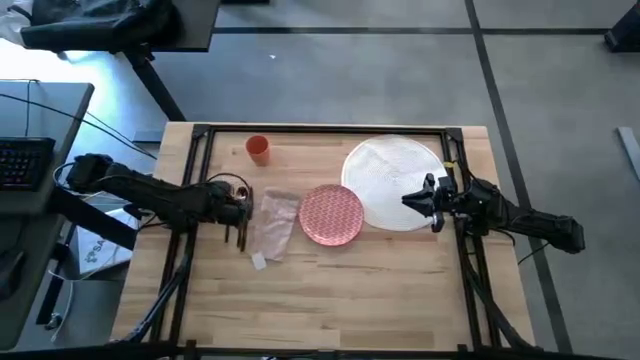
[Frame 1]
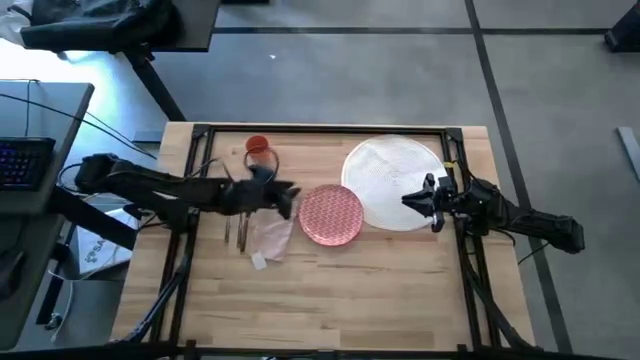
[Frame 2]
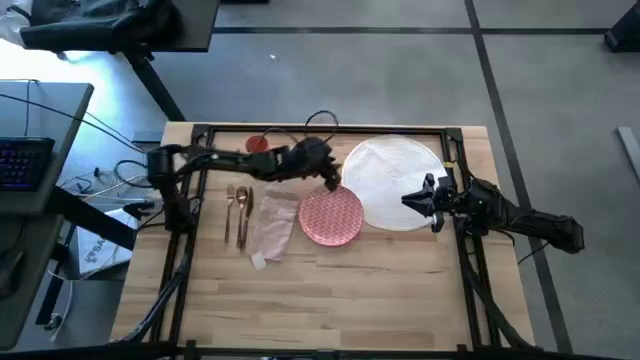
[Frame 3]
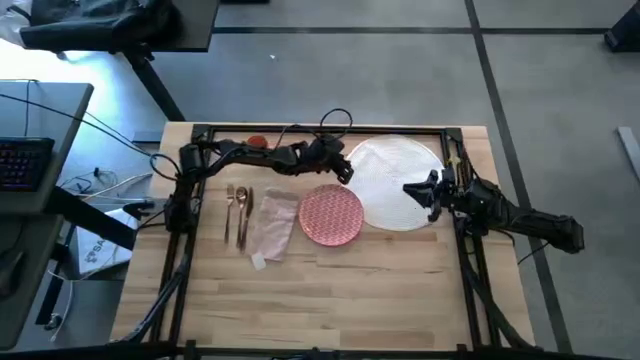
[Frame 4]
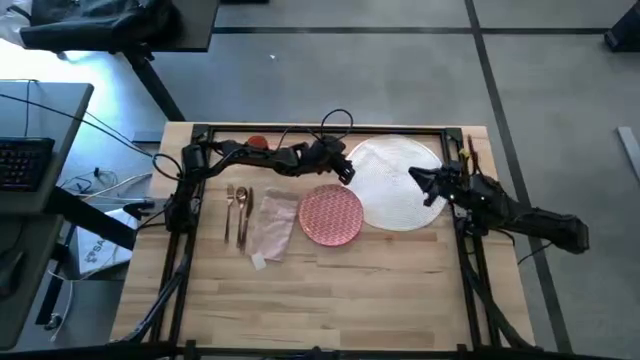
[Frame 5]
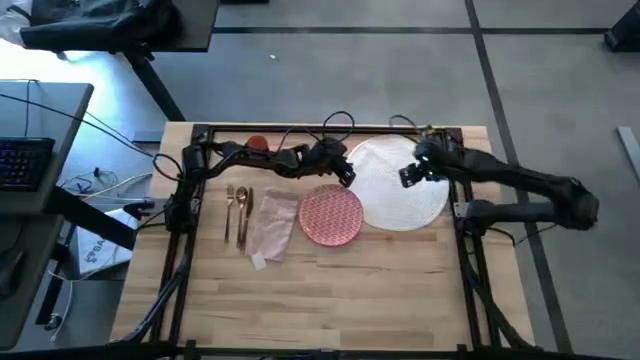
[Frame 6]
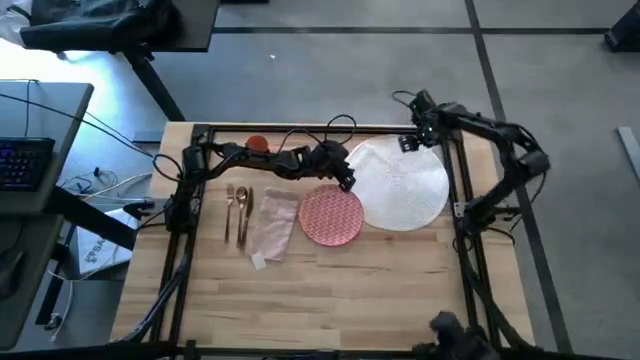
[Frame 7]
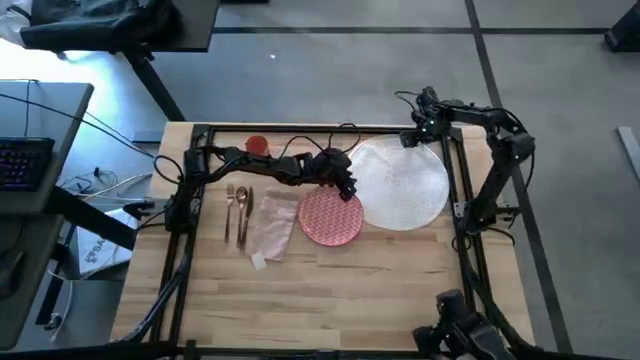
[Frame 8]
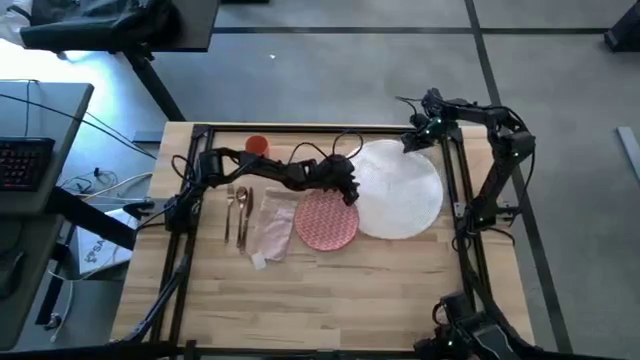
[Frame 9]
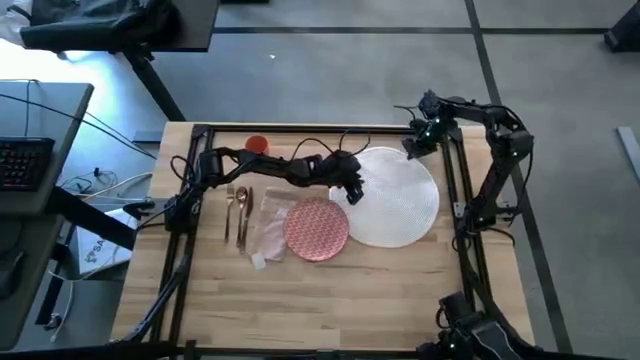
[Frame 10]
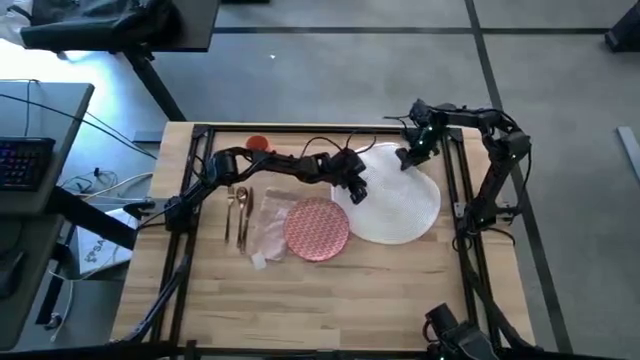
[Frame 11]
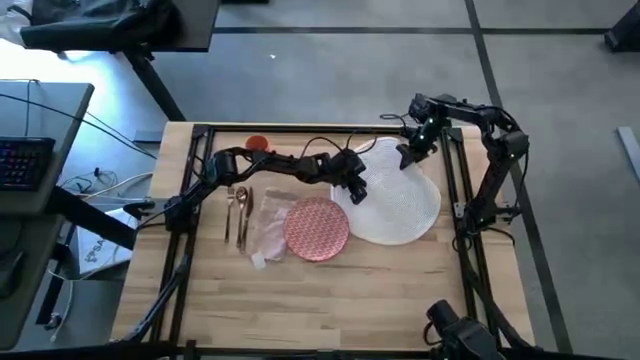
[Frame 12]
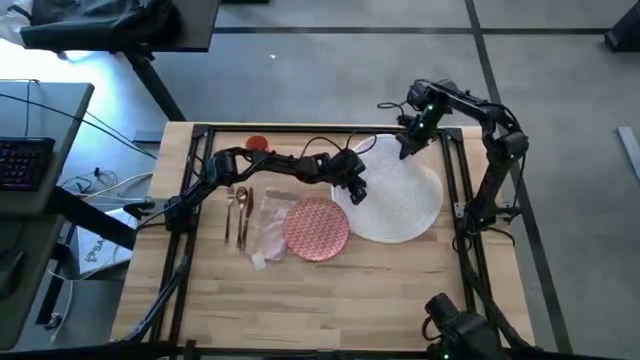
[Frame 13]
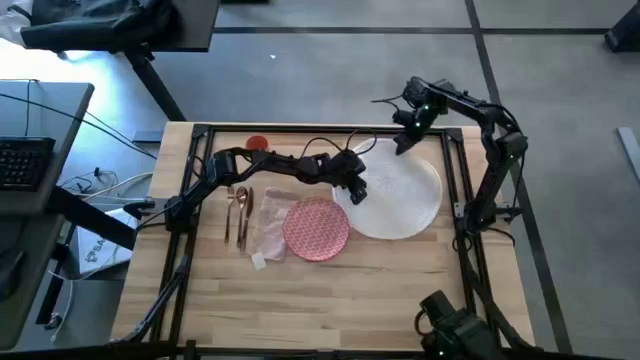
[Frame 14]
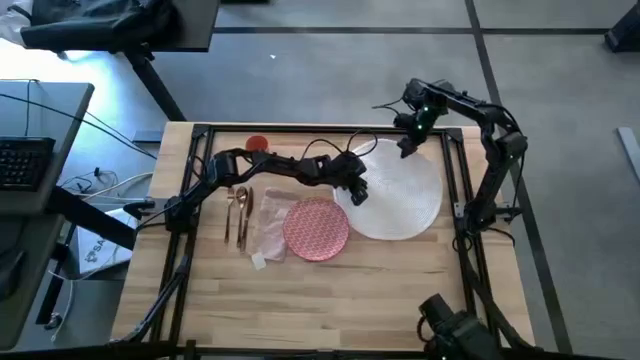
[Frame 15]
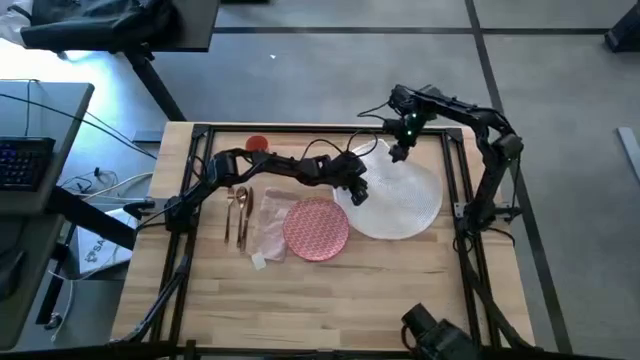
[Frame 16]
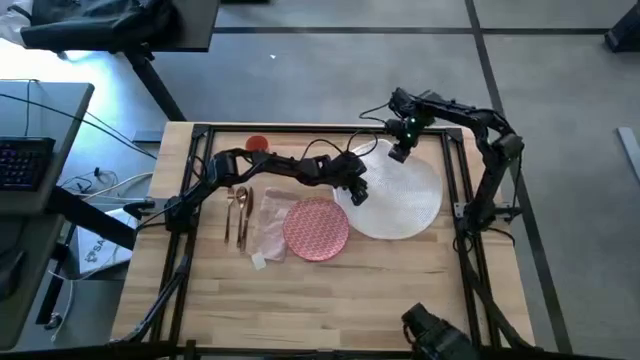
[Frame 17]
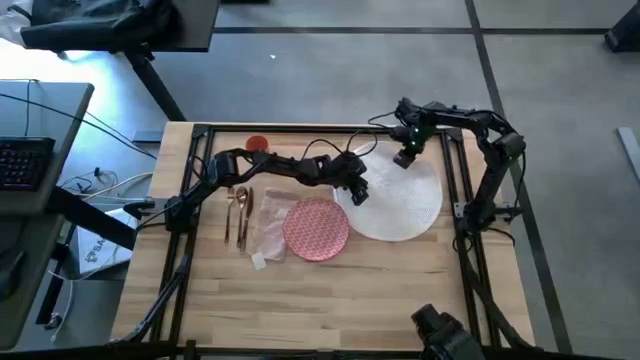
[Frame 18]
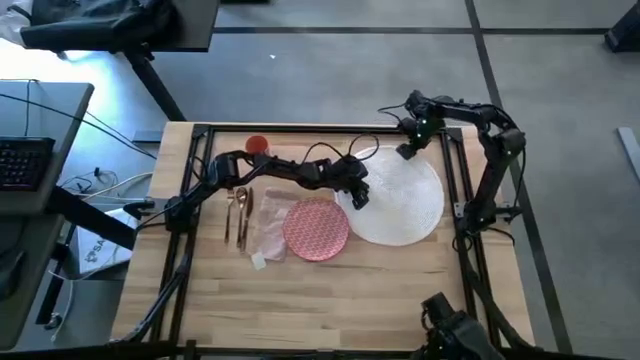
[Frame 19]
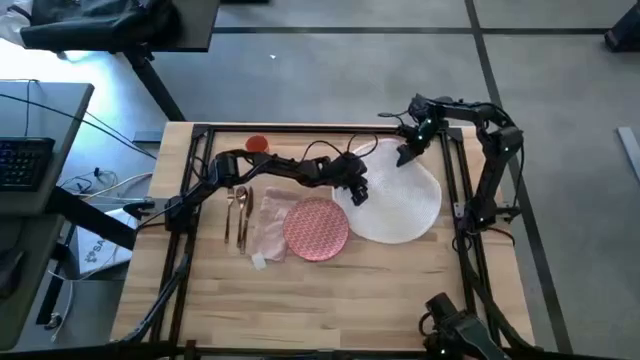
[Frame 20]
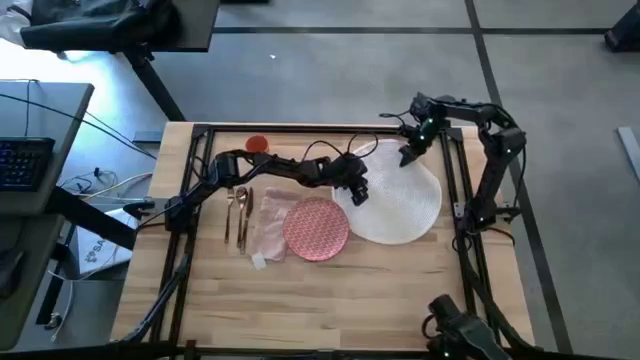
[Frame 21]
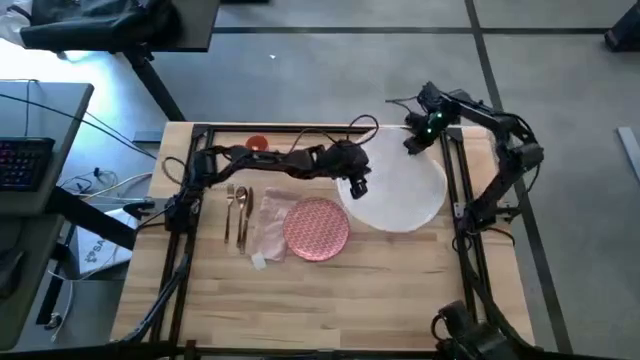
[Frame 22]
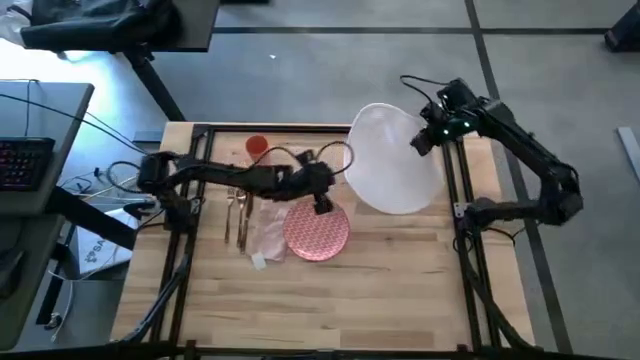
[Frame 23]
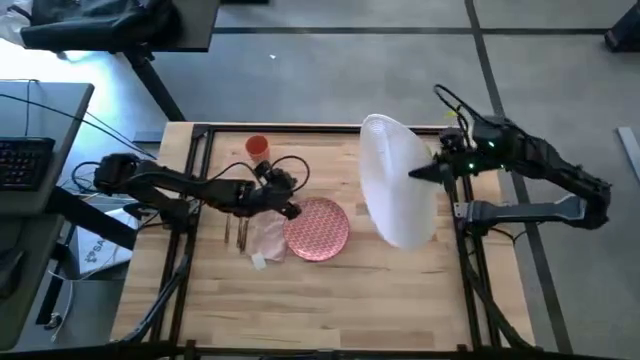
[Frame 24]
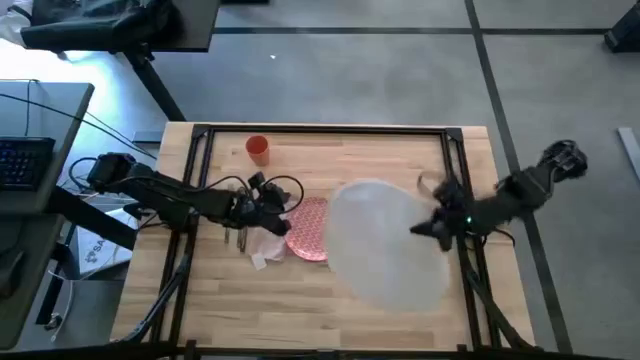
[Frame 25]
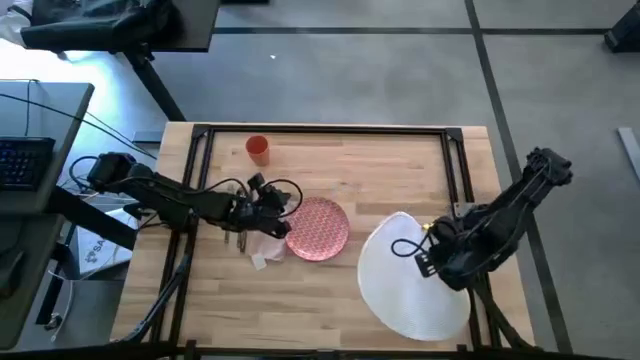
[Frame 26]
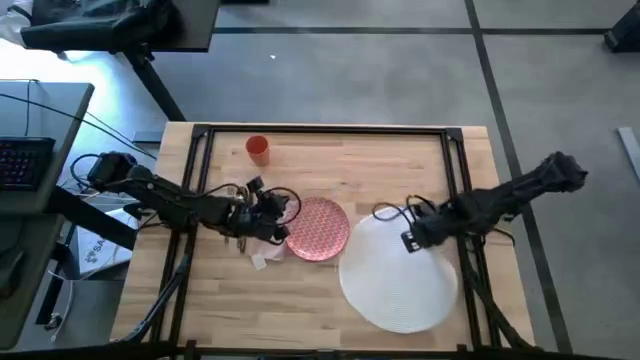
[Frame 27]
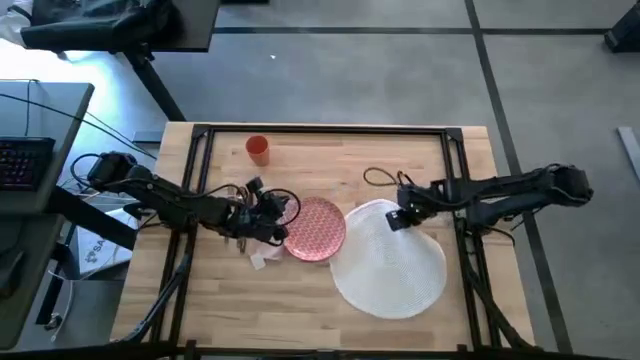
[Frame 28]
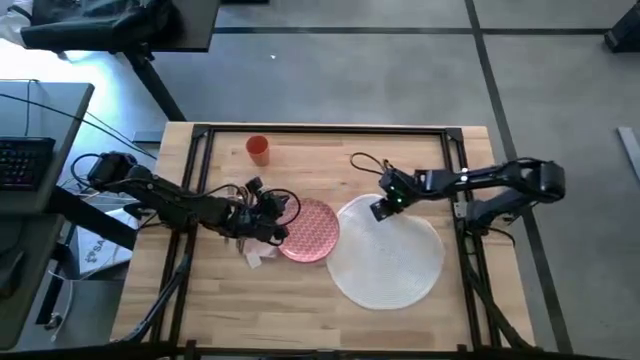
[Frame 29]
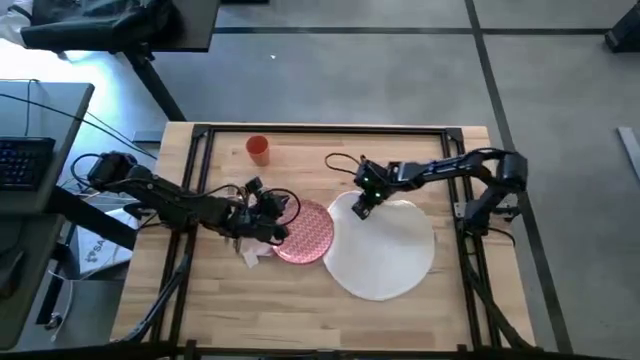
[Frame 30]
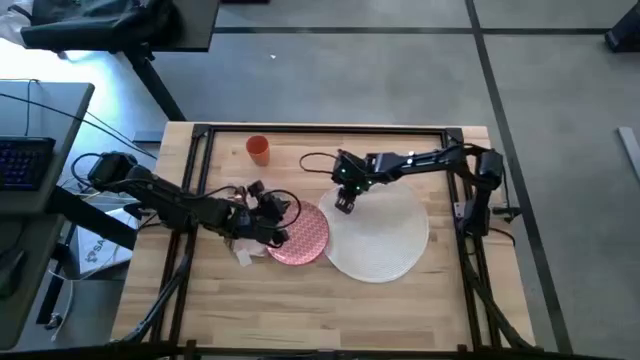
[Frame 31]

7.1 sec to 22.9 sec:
Task: Set table place
Move the placemat from the upper right to the middle right

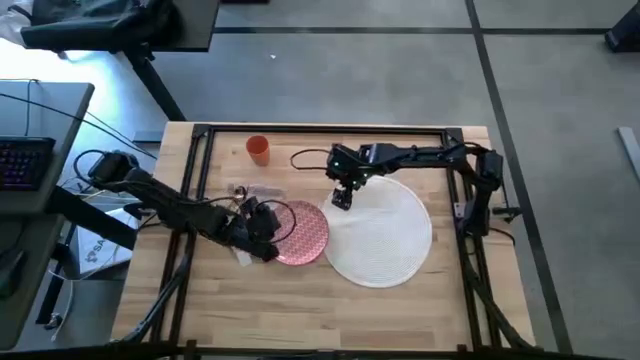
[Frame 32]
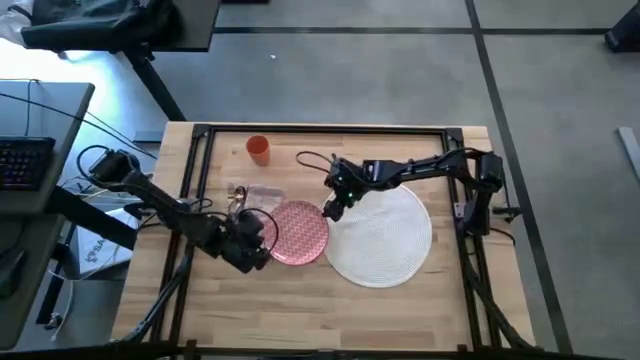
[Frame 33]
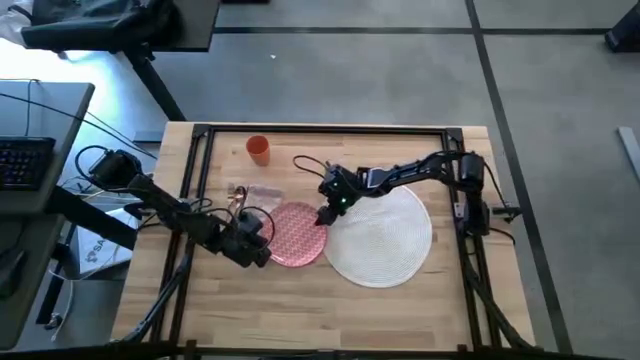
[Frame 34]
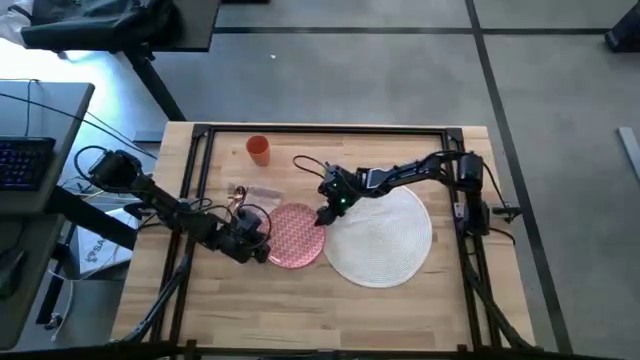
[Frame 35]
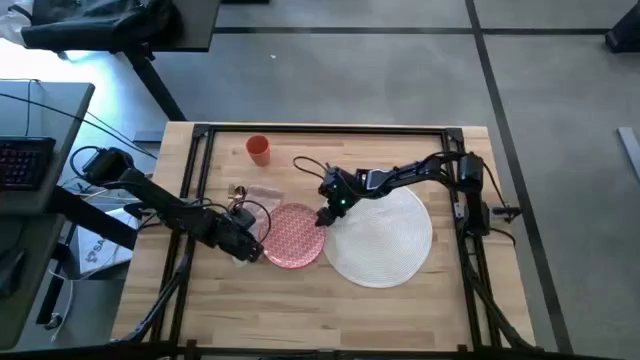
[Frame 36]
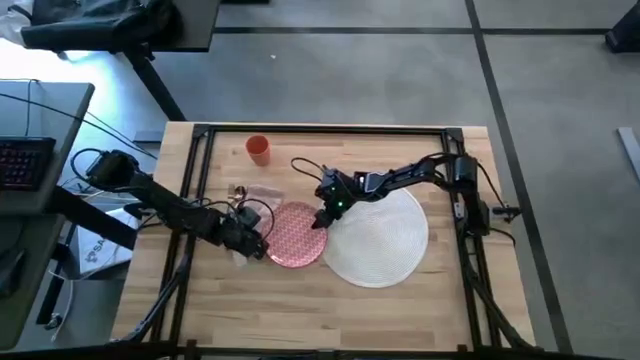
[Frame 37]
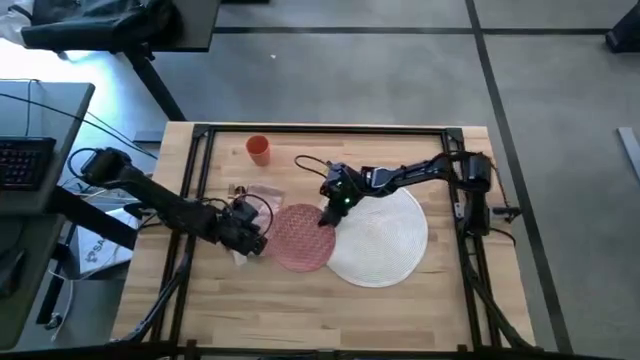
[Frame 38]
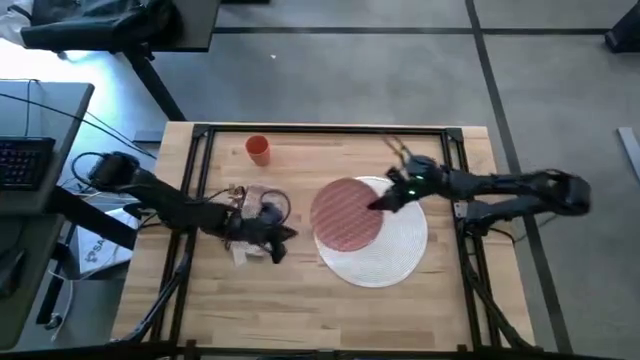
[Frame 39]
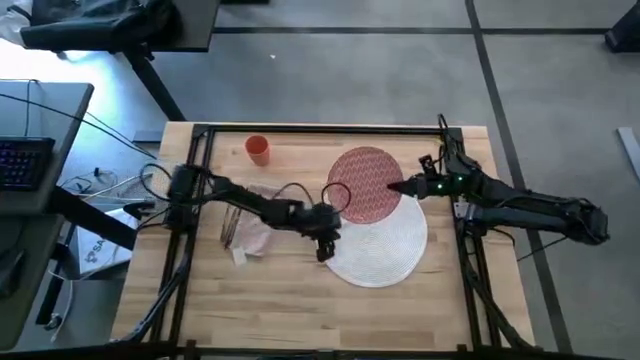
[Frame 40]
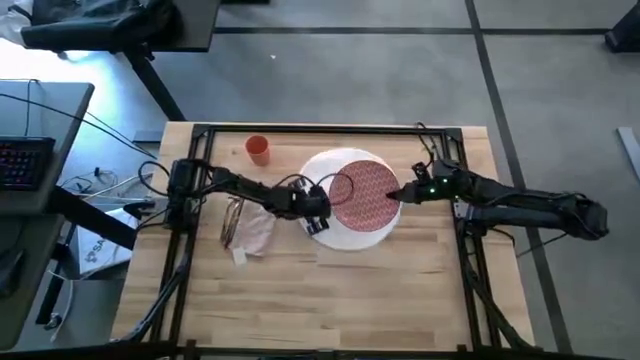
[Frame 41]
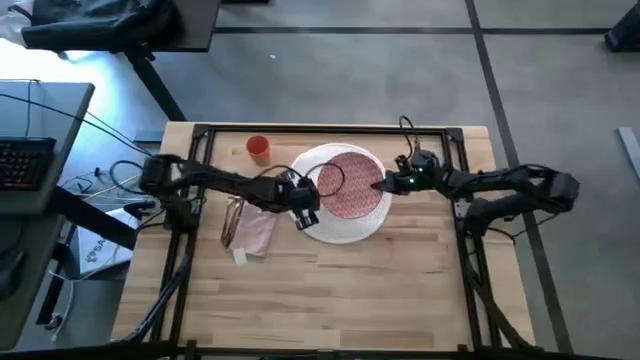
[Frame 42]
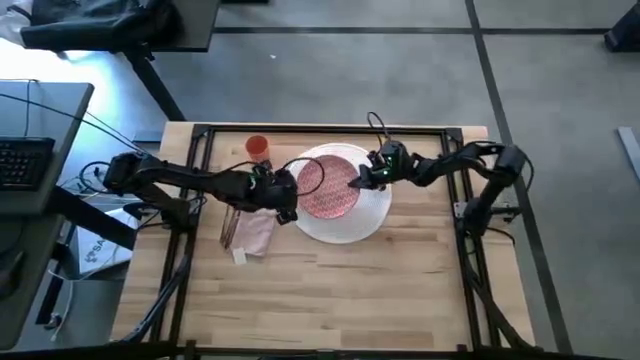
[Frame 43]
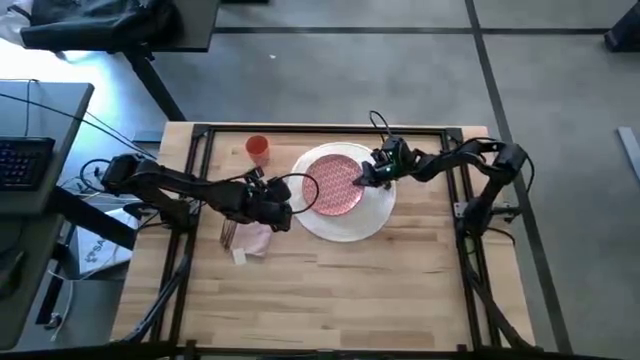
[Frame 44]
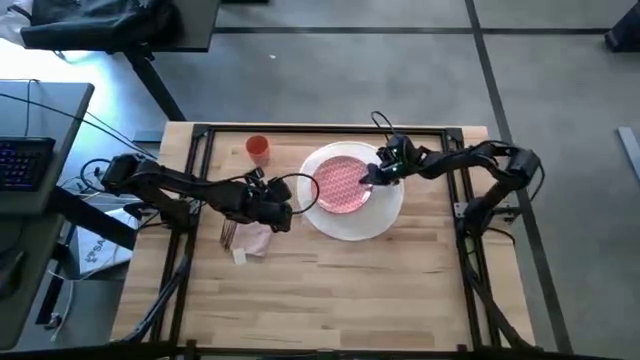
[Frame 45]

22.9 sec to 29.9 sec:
Put the plate onto the placemat
